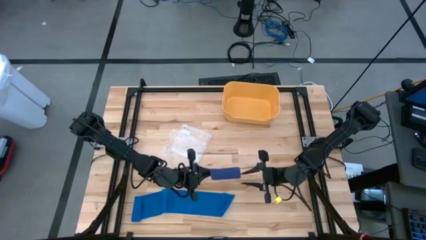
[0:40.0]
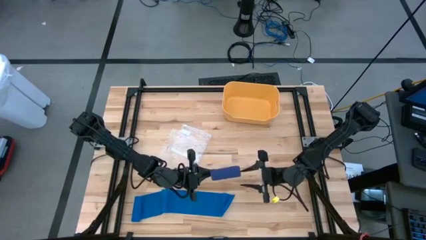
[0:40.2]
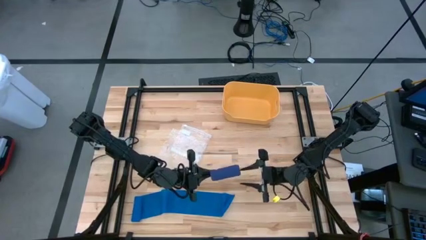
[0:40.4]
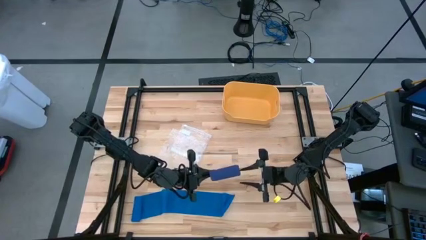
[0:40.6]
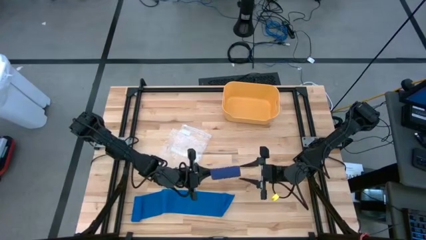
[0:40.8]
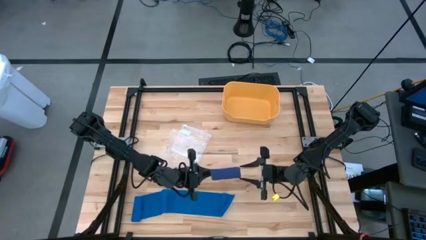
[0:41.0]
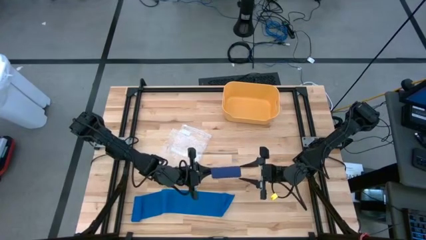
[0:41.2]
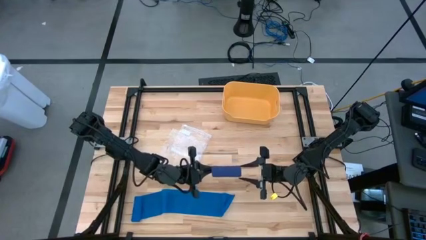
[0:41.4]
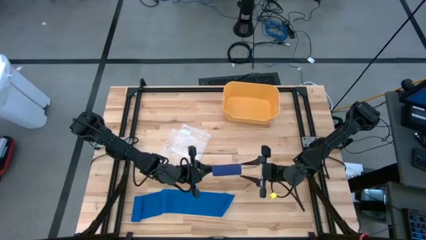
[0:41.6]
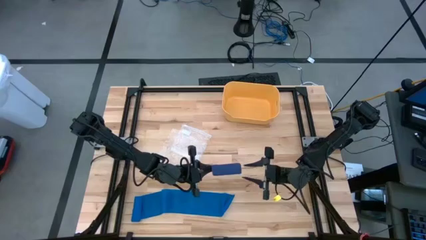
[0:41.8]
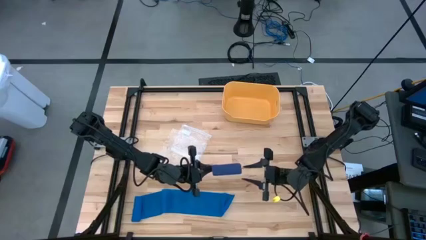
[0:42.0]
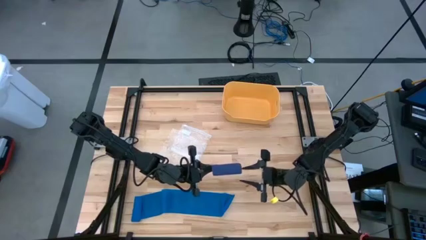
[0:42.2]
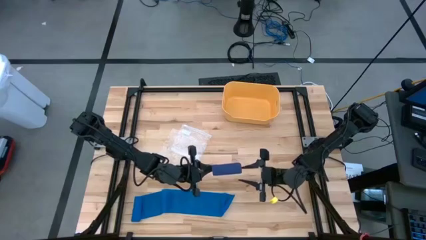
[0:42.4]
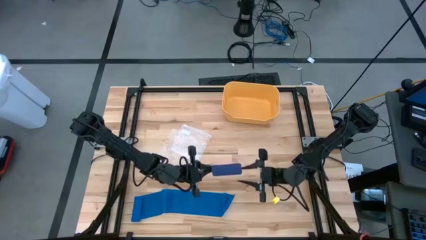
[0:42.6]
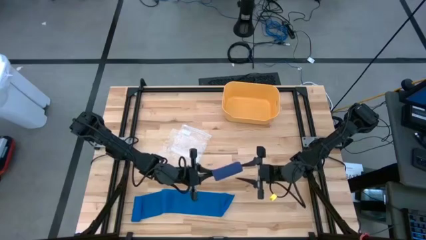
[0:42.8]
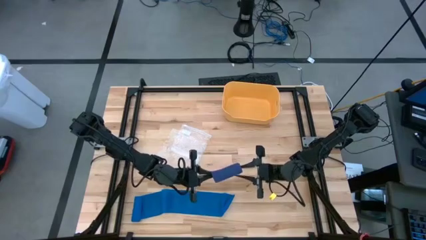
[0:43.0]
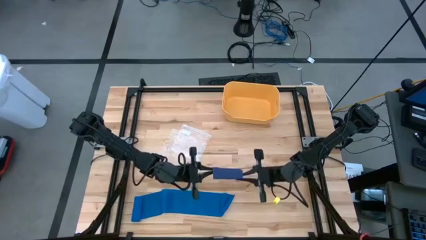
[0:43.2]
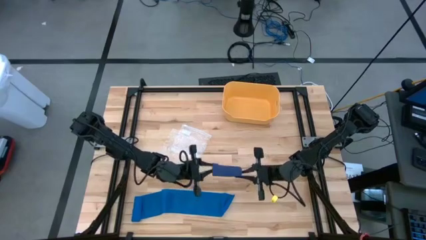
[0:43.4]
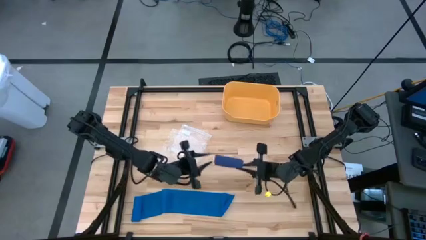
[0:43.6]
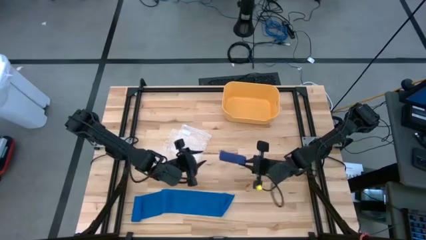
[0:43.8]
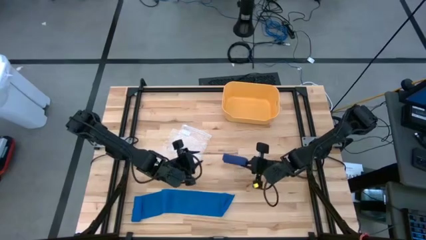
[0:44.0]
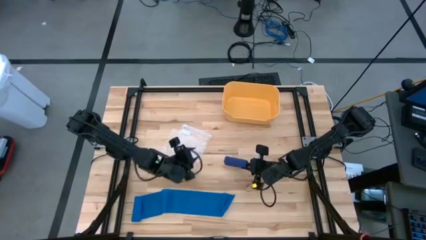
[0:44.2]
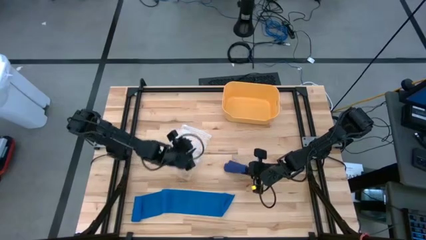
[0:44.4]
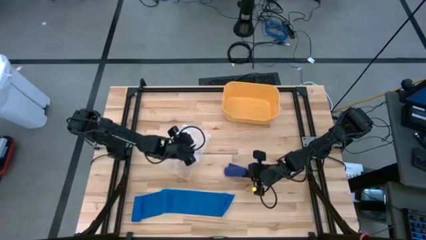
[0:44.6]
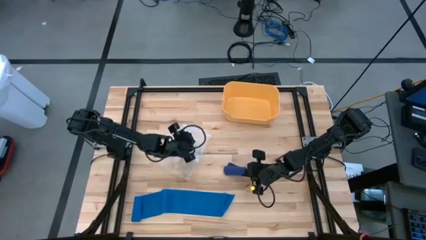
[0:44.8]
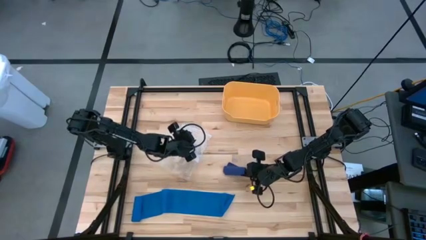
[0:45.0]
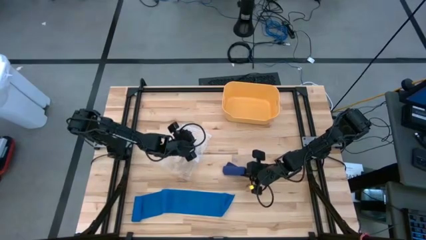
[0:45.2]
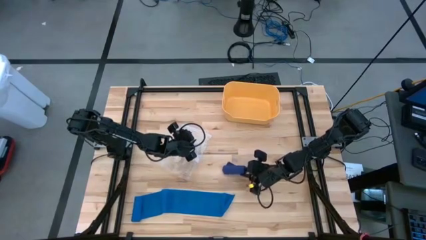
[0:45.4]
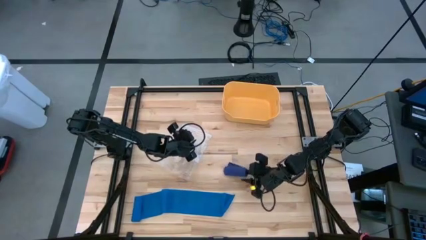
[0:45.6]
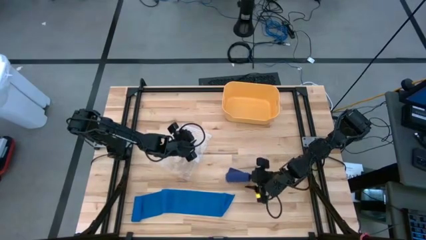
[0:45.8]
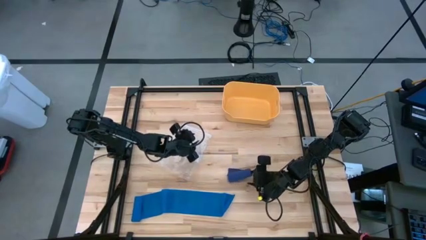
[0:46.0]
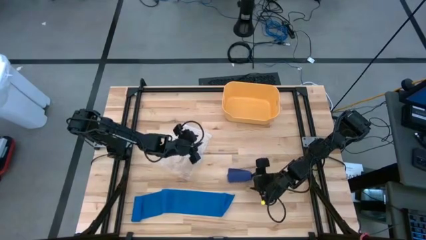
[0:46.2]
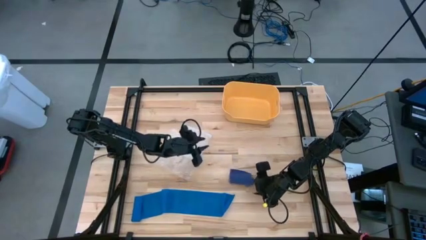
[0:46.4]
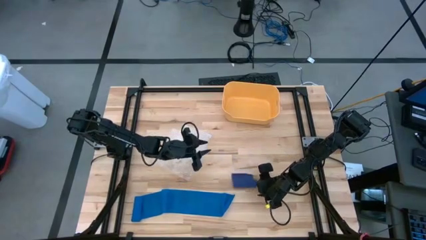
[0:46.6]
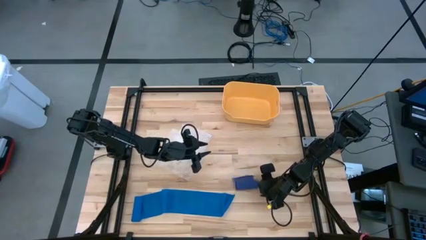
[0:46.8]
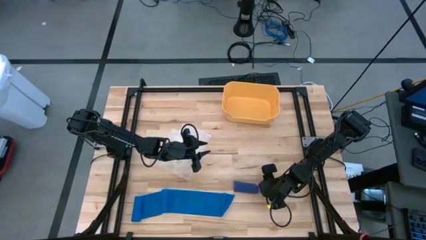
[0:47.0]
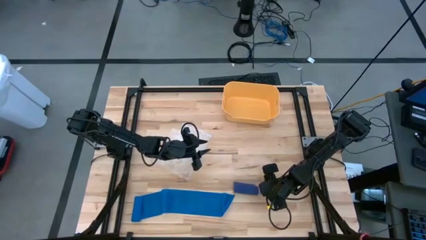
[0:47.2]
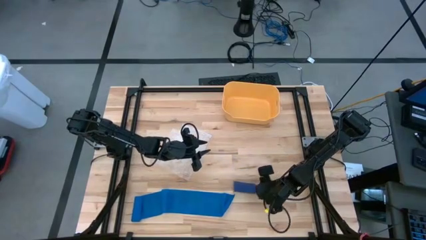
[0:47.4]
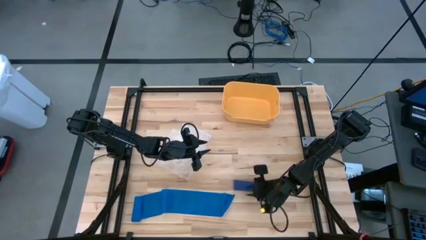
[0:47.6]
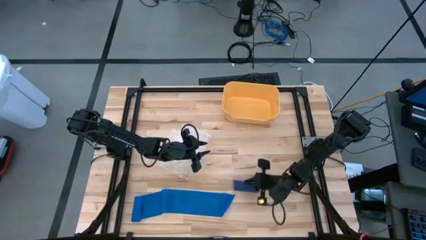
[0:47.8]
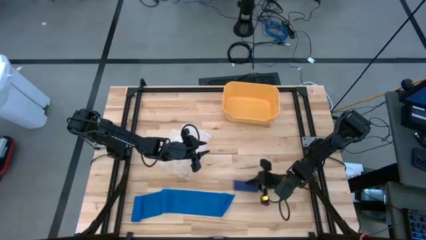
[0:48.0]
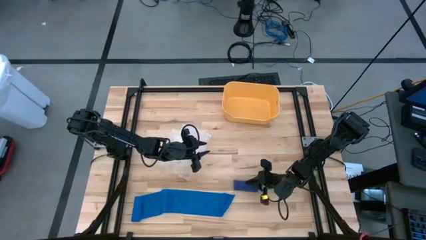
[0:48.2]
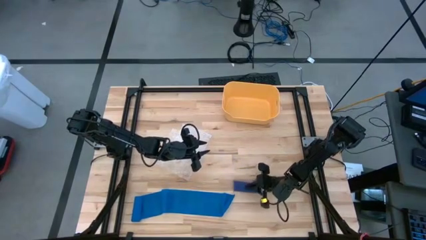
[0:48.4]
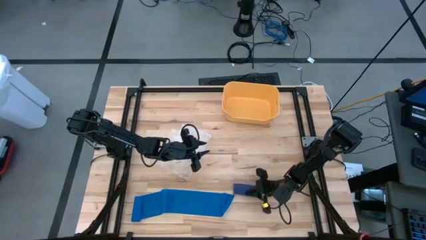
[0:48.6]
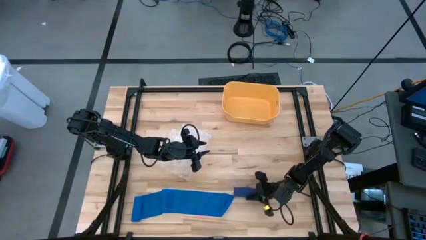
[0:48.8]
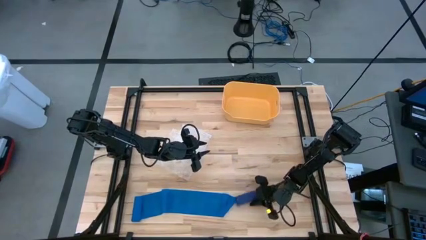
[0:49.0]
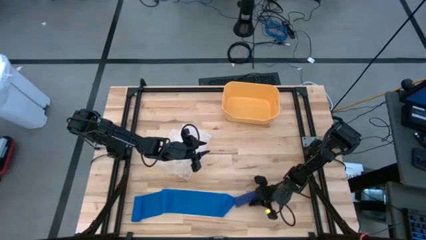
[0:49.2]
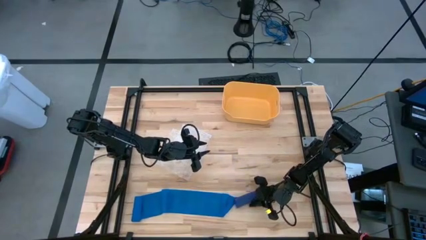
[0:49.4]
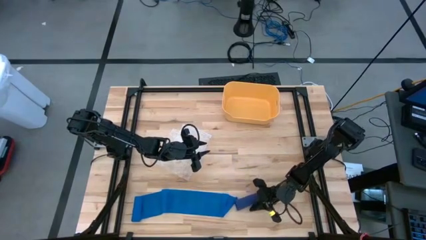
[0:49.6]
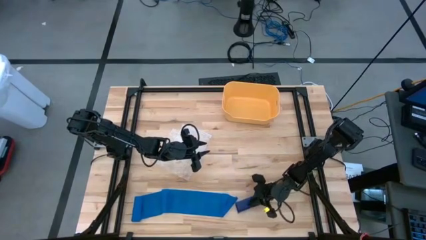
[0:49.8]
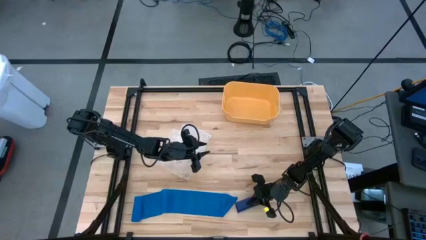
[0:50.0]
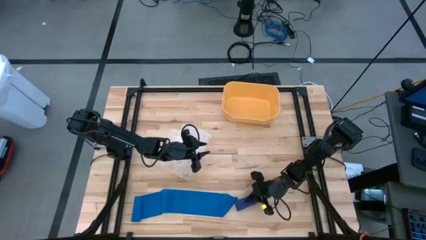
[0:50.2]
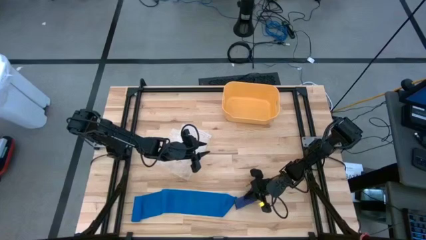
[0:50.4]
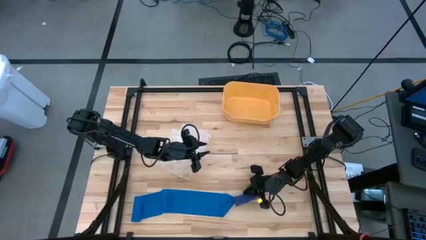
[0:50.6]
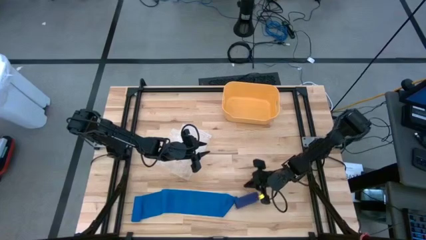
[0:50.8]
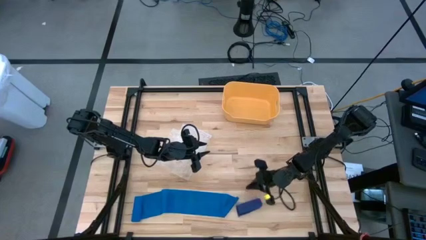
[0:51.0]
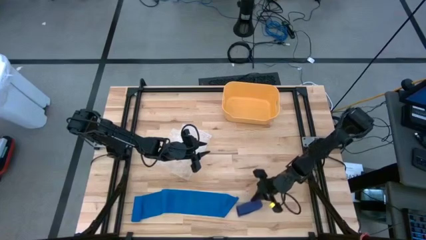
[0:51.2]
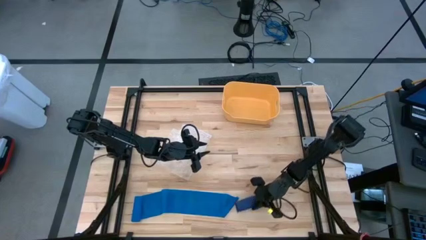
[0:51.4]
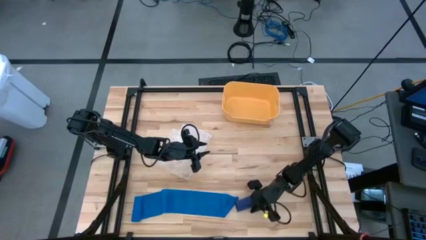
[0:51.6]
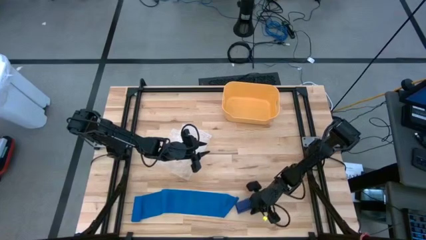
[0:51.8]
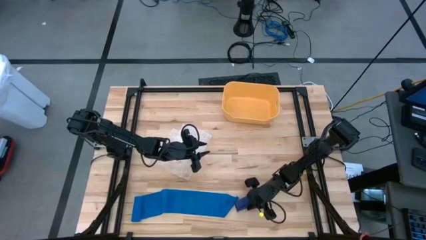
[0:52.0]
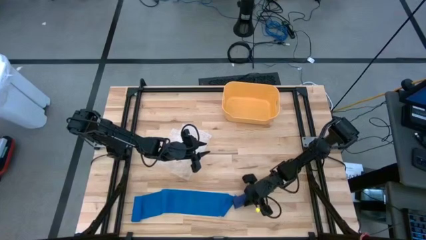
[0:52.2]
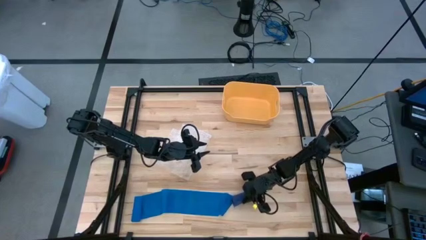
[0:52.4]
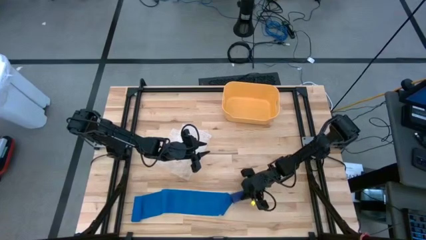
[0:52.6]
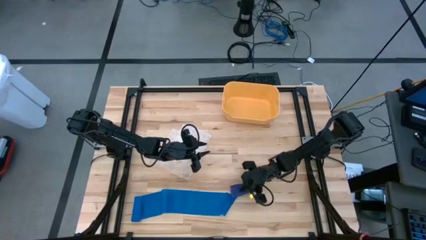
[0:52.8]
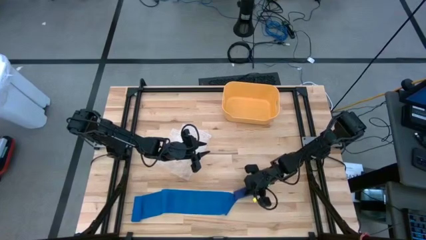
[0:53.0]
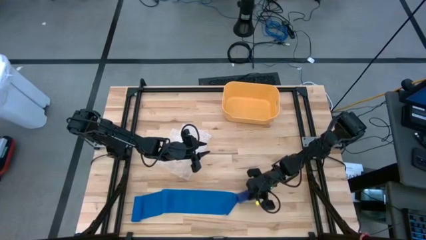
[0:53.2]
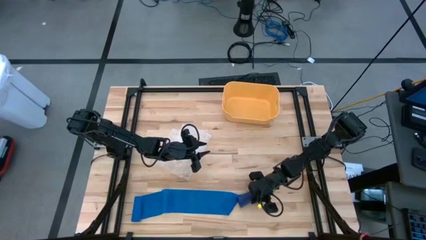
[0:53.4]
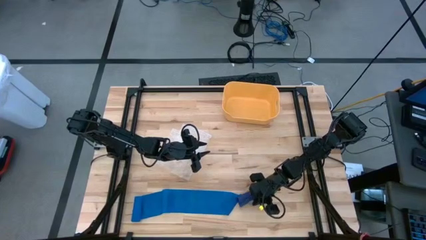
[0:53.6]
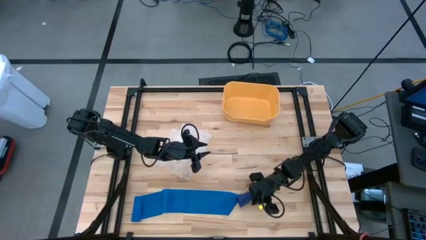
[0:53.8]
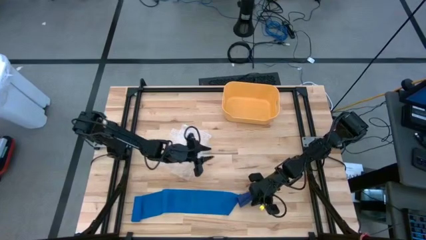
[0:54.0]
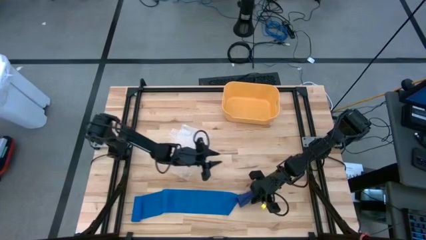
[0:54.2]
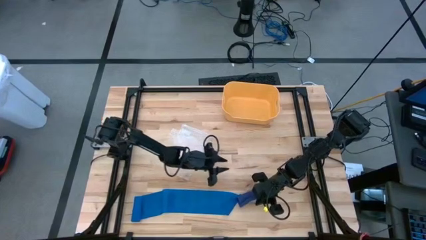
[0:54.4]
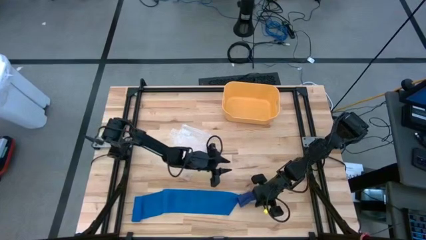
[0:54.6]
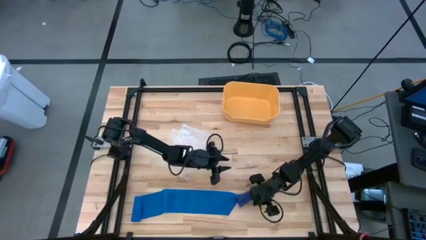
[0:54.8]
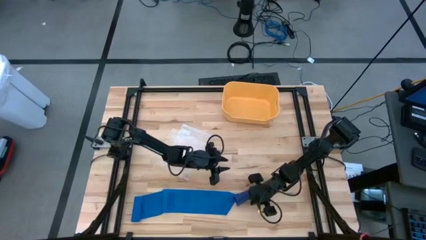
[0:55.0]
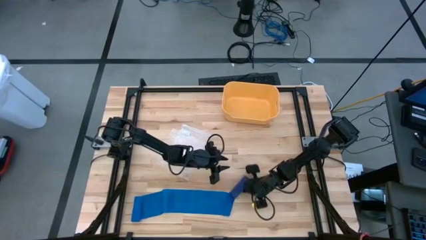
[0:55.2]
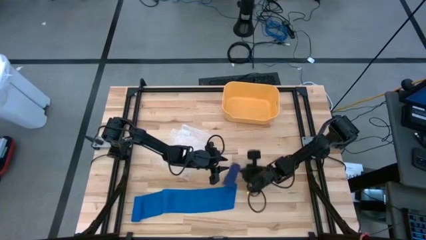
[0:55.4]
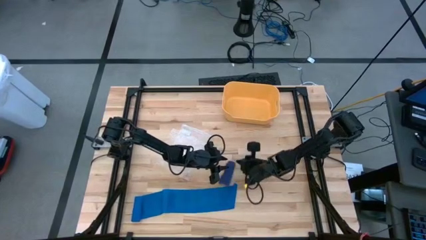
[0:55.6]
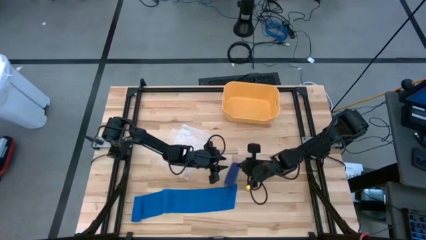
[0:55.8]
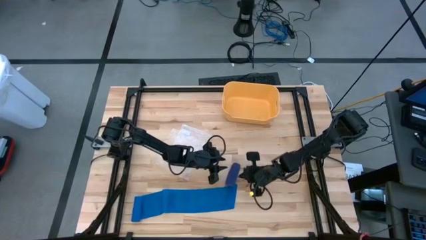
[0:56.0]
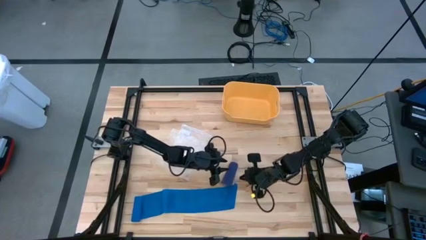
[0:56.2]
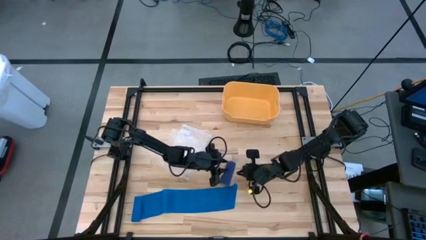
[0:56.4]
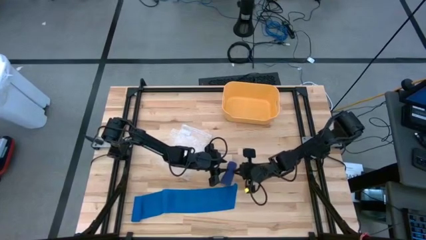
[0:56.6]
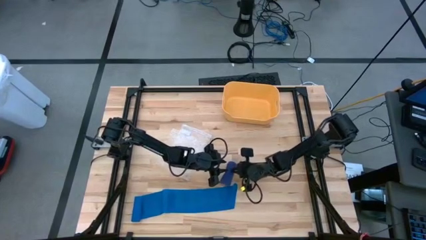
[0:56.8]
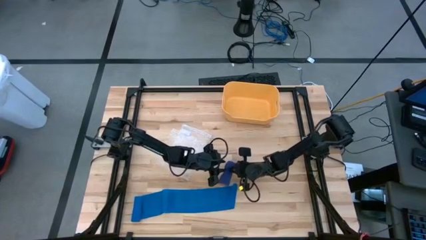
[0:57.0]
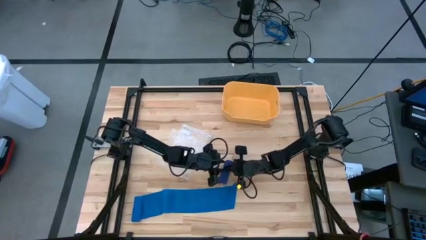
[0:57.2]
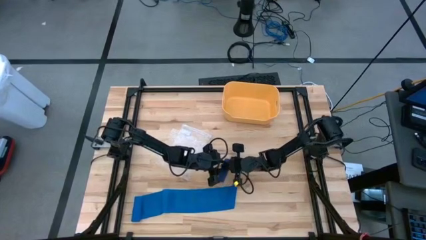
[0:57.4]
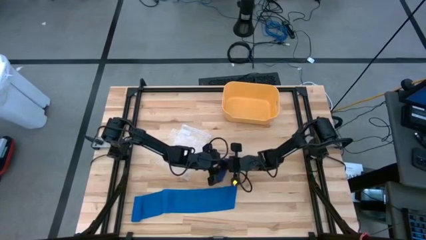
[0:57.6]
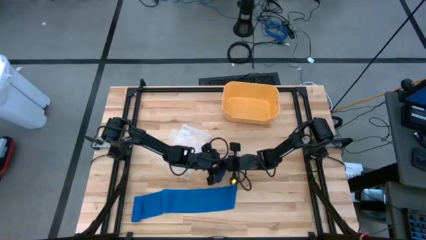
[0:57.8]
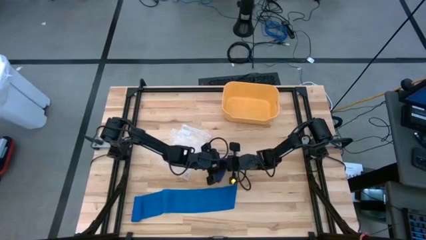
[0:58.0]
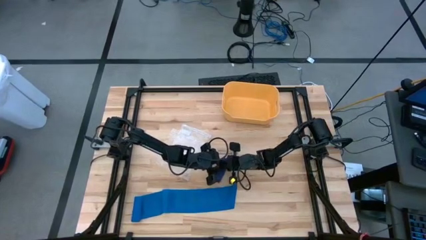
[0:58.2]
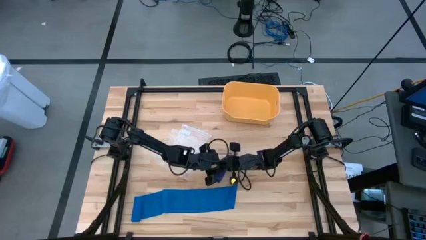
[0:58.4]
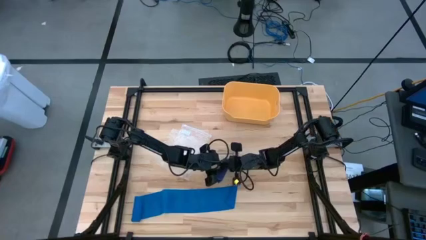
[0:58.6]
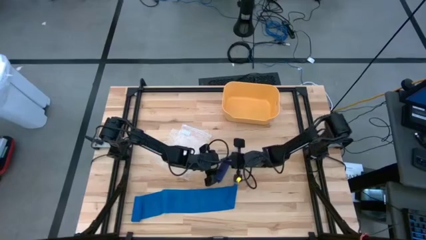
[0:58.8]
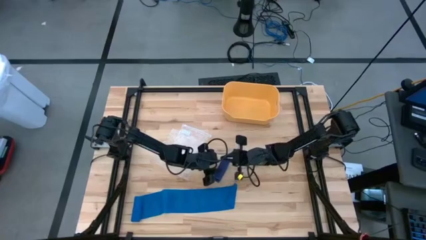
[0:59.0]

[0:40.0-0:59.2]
Task: Roll bandage
Roll the dark blue bandage
